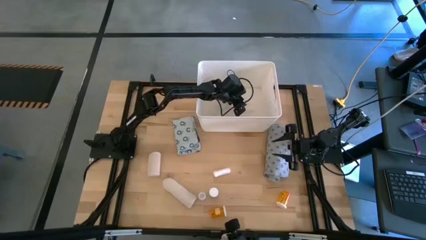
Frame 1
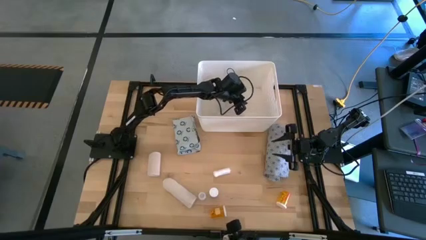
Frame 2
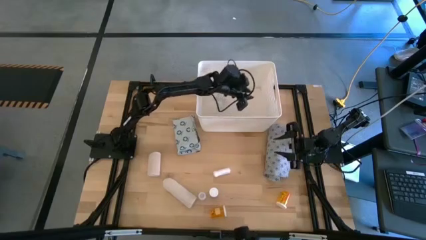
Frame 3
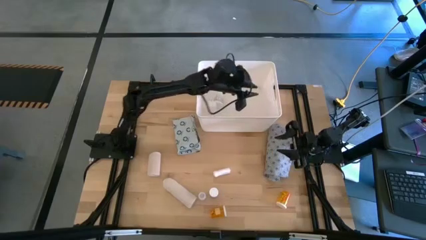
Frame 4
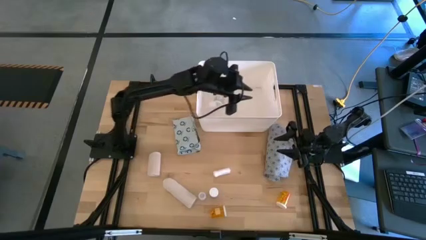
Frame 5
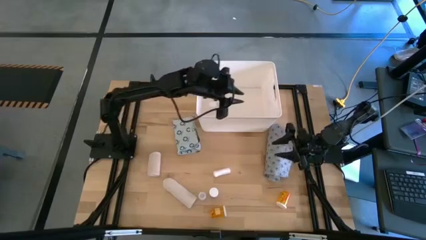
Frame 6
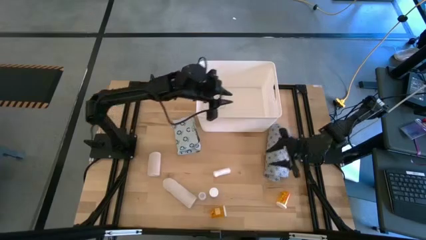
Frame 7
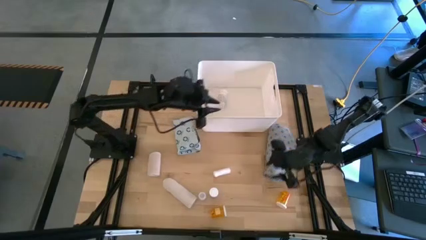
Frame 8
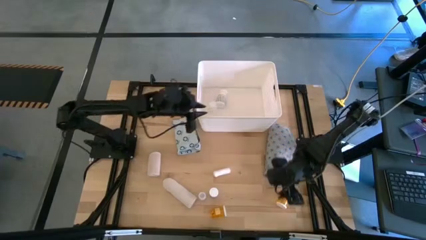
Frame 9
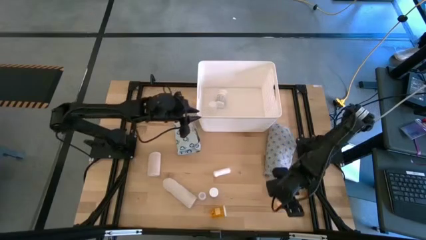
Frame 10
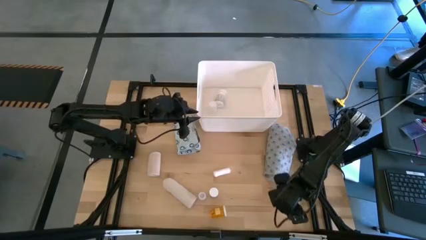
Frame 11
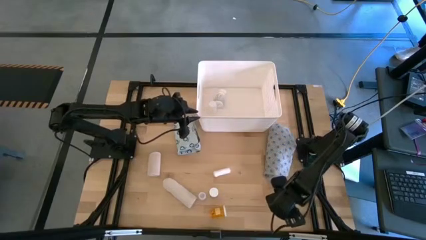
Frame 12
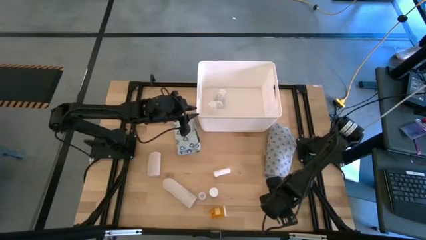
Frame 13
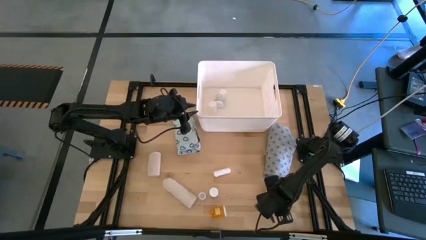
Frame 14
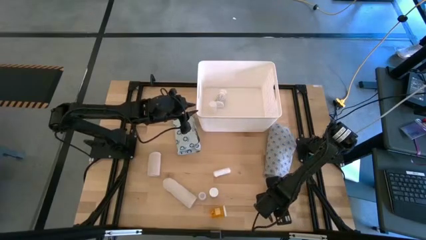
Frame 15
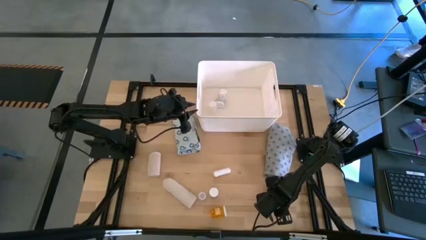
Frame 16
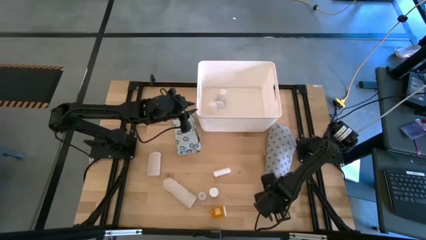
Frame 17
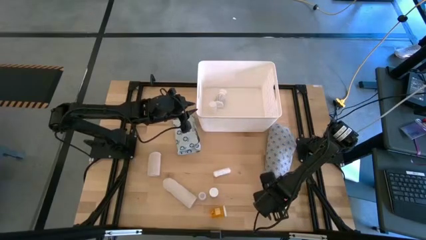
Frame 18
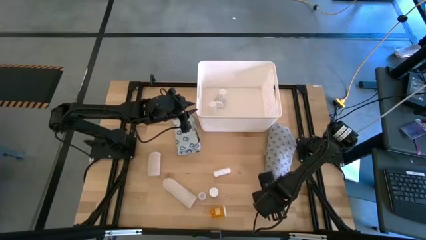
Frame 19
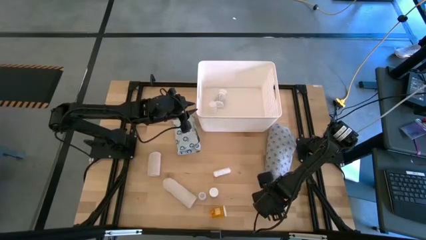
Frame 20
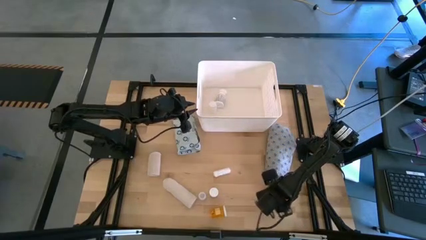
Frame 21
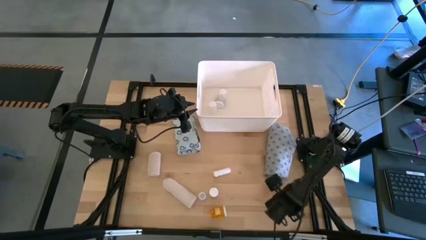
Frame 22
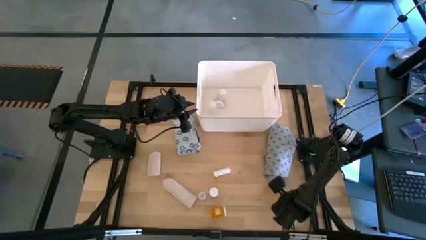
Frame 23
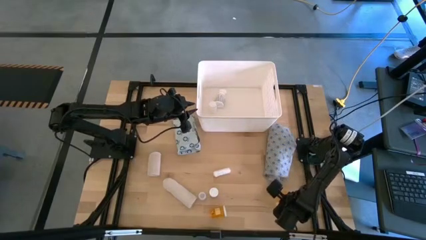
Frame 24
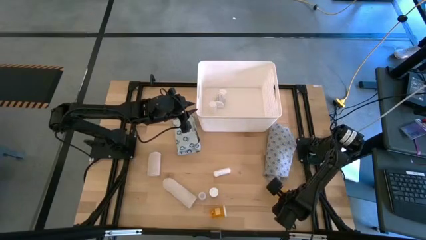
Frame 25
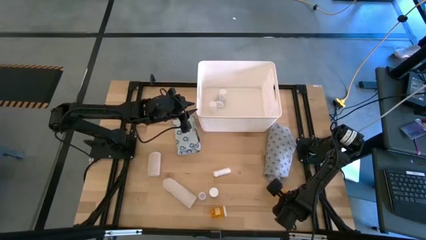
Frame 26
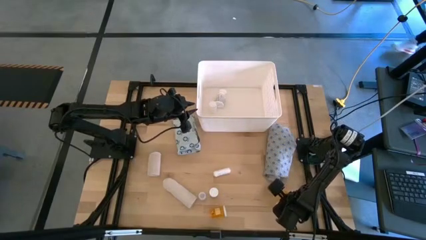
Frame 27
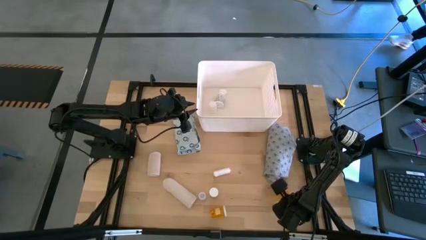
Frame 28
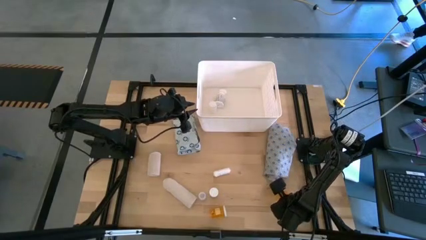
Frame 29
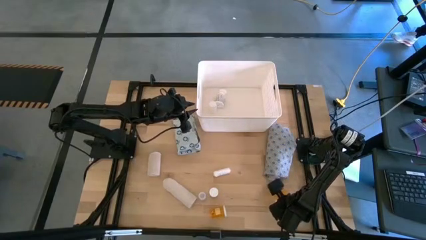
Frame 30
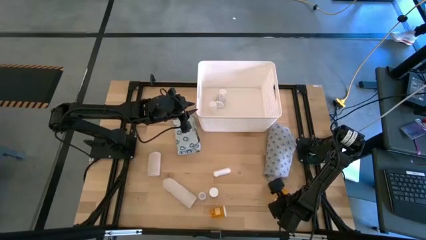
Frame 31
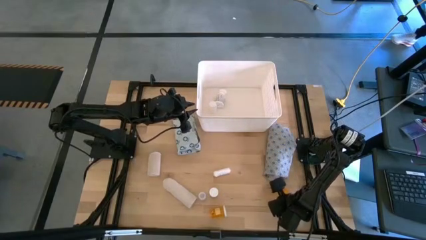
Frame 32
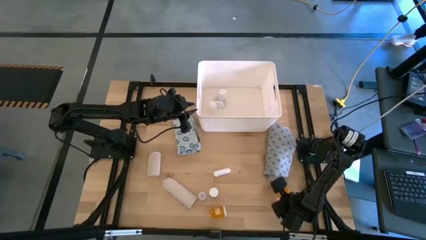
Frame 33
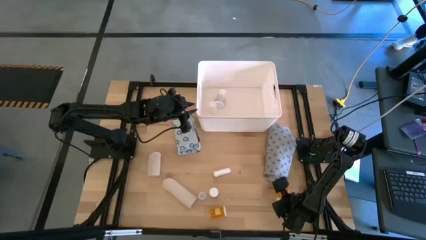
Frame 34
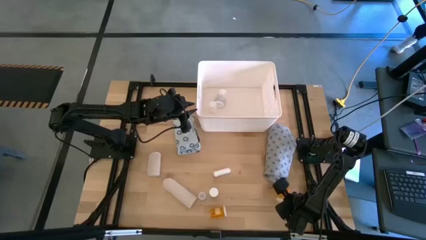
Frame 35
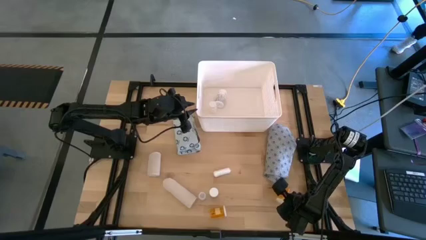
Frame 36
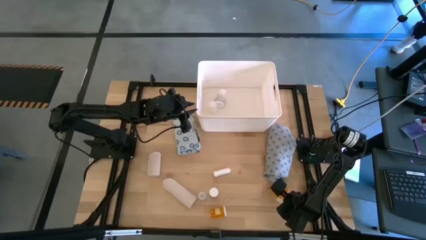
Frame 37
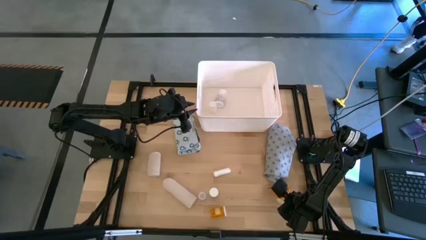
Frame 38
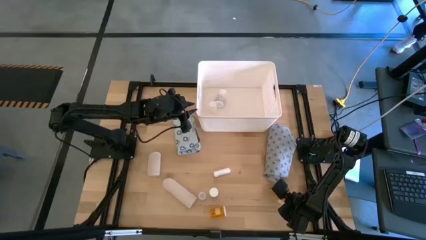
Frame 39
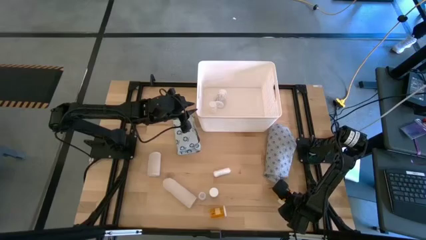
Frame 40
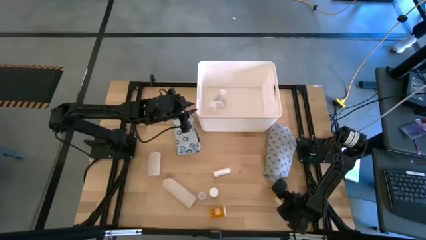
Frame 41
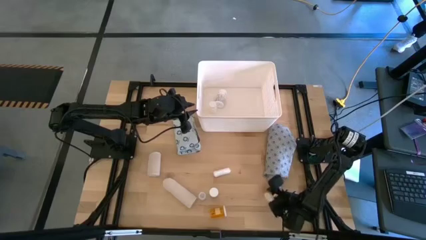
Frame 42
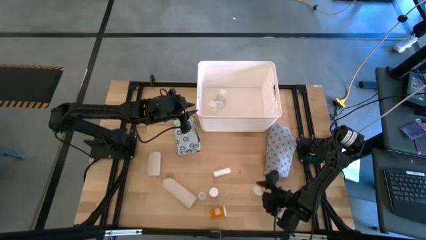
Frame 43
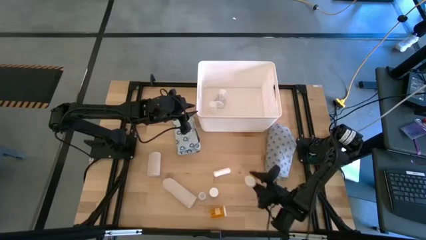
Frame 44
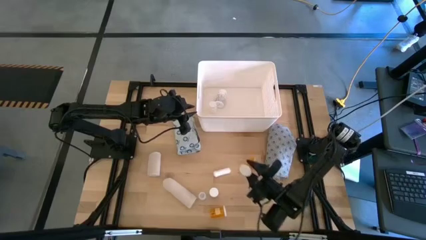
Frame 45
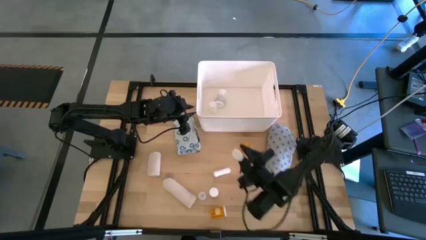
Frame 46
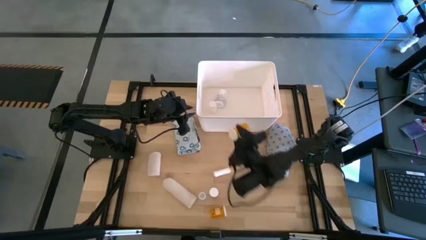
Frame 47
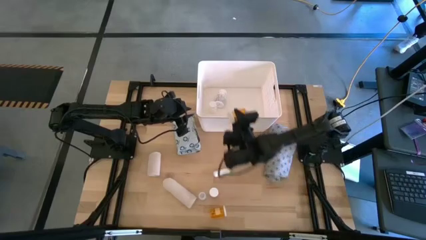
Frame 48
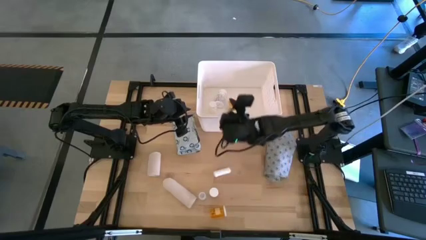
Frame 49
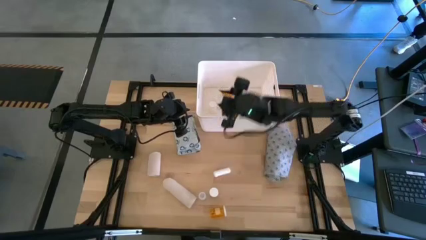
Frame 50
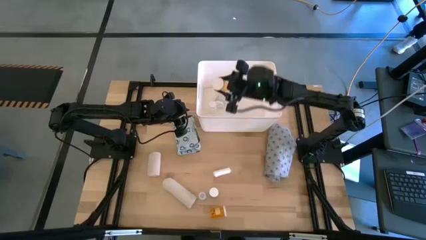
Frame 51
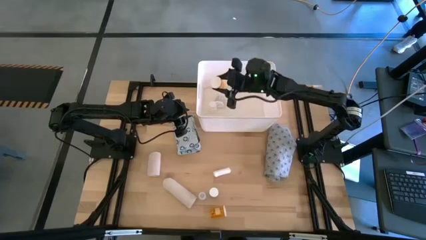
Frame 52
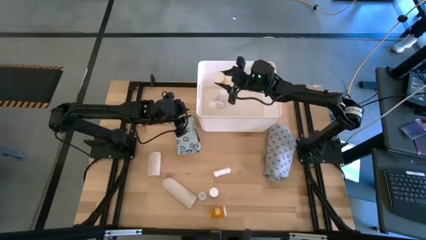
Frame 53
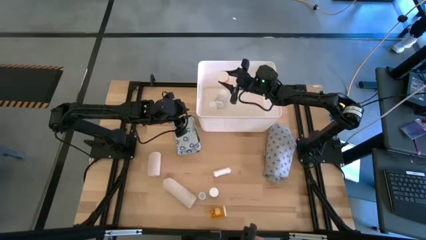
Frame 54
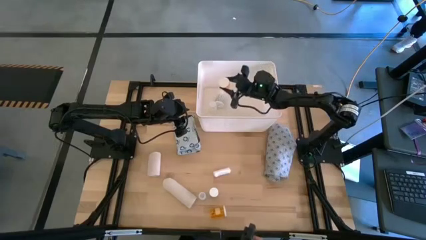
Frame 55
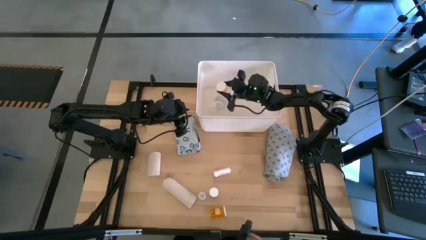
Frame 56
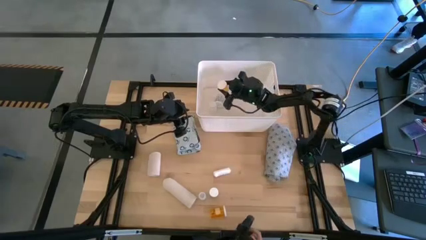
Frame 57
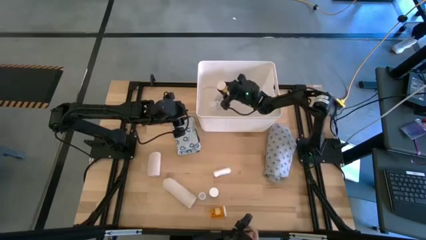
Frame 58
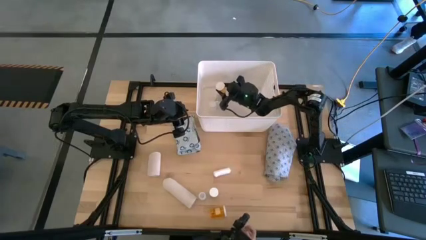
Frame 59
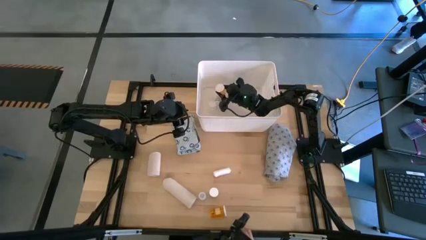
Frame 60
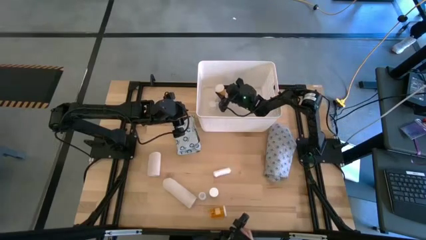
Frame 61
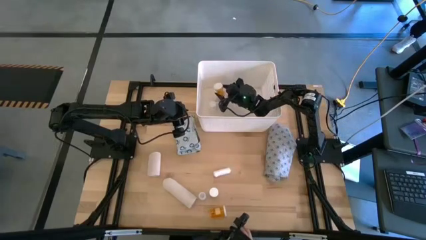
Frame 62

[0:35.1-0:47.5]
Task: Pick & place medical supplies in basket/bin
Put the right orange pill bottle into the white bin

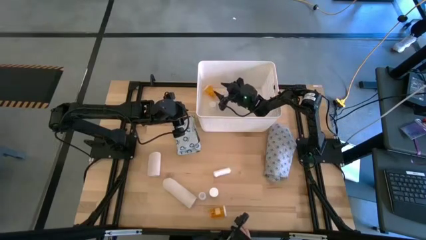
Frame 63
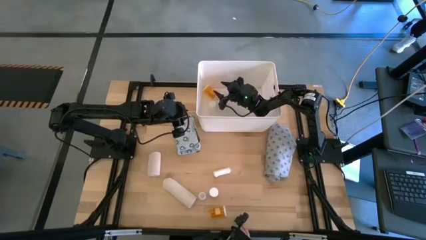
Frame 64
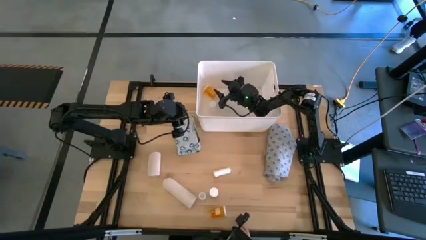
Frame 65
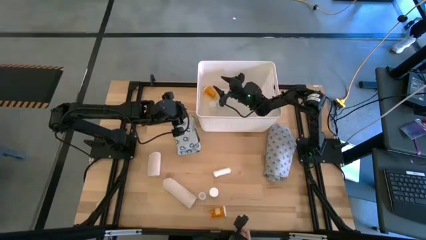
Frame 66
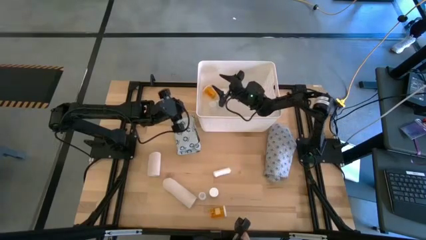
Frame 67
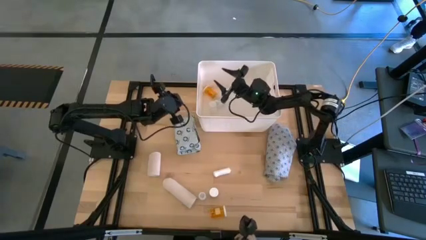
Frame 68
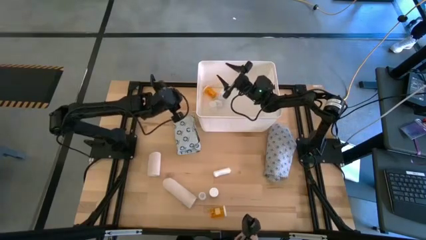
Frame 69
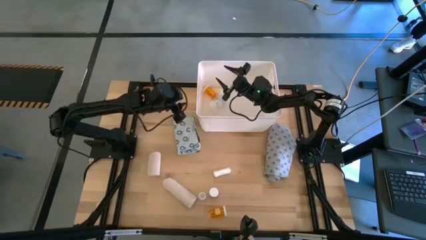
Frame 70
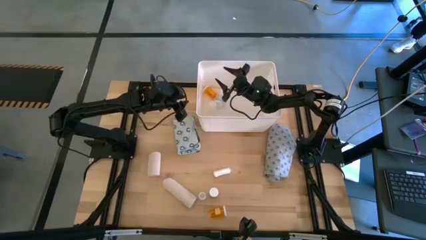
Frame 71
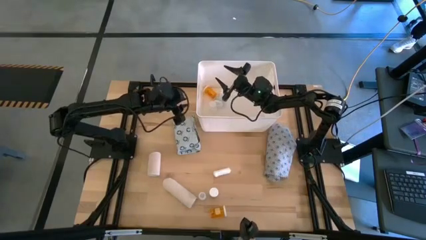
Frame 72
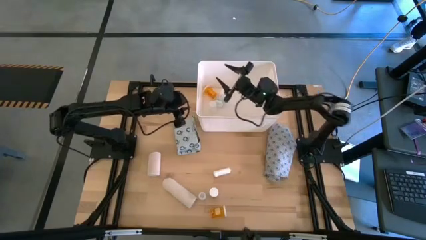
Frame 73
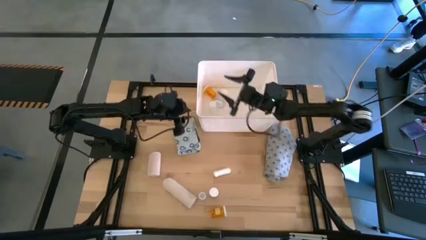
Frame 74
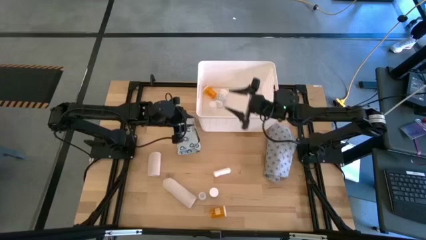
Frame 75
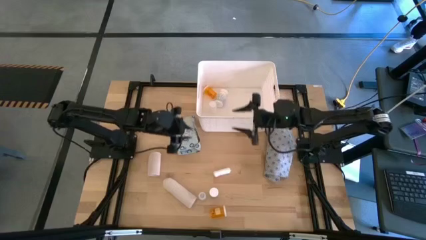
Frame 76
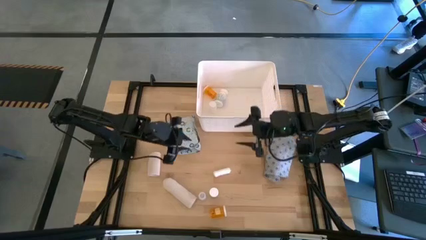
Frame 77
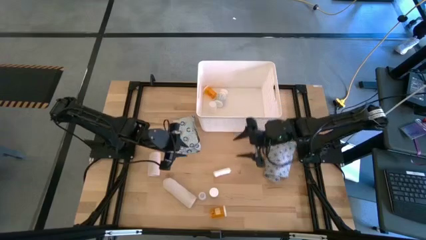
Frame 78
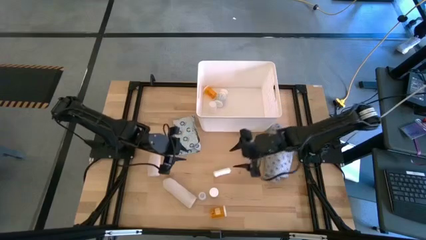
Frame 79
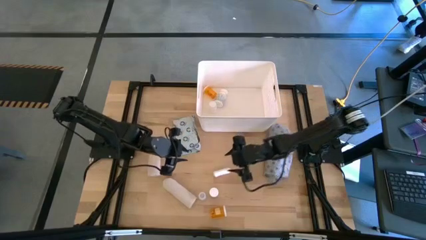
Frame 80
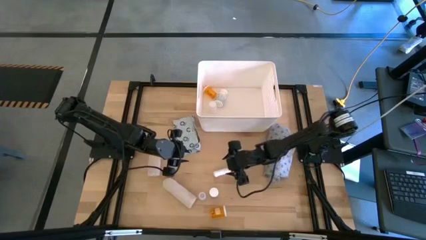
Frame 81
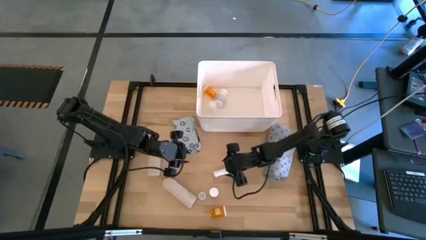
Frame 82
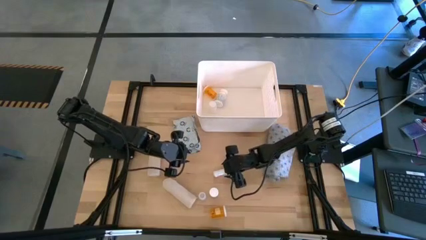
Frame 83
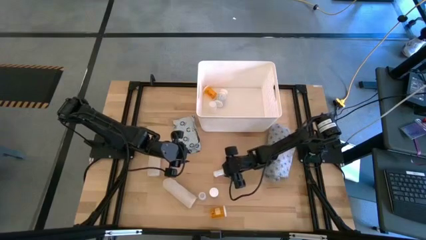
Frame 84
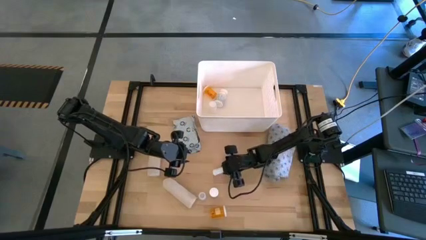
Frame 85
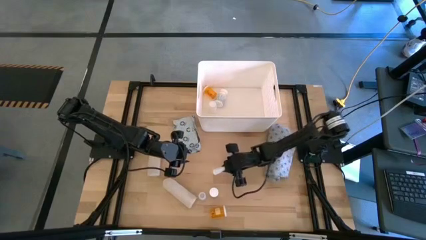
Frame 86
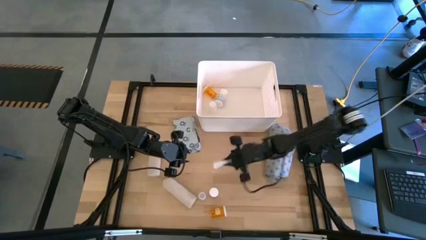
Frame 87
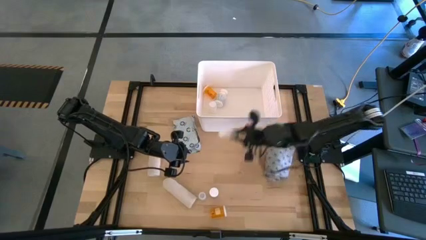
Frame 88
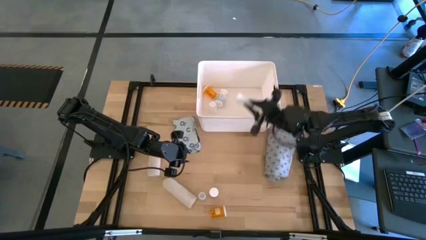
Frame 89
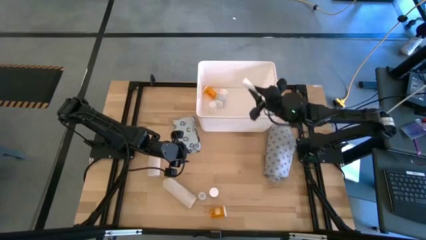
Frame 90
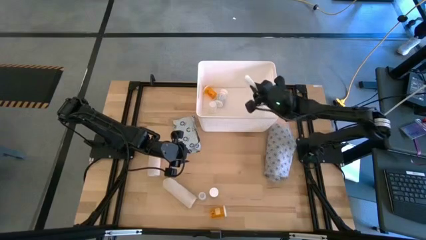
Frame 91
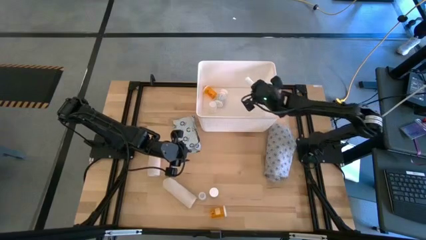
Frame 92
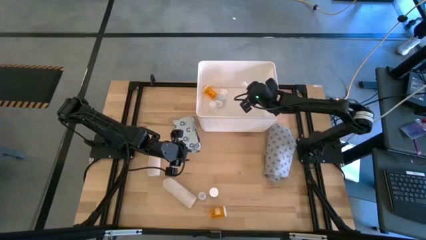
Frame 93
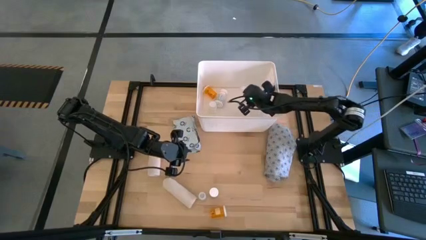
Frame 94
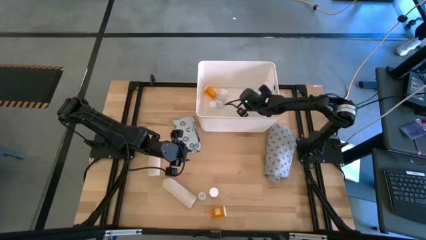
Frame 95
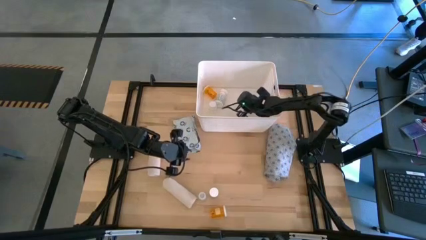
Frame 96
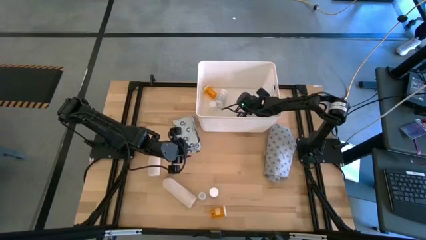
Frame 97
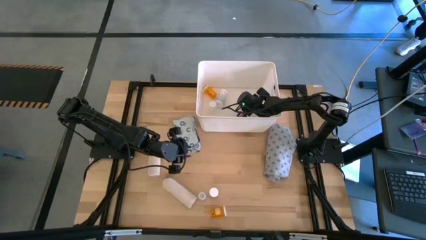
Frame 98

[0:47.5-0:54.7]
Put the white rolled gauze into the white bin
